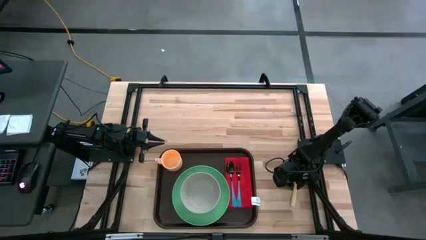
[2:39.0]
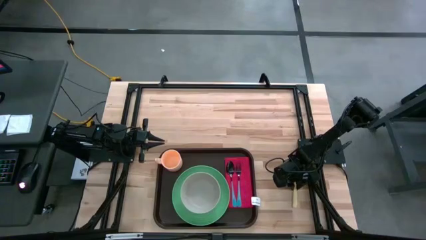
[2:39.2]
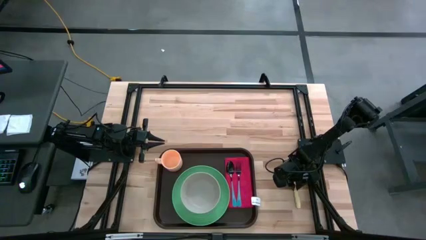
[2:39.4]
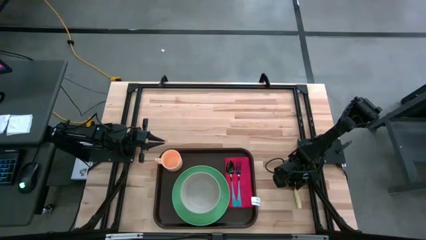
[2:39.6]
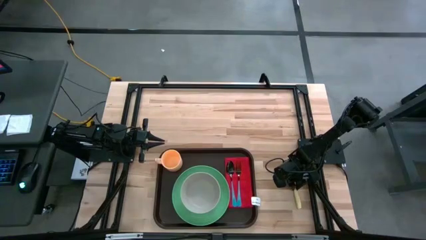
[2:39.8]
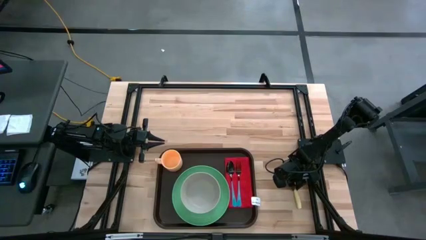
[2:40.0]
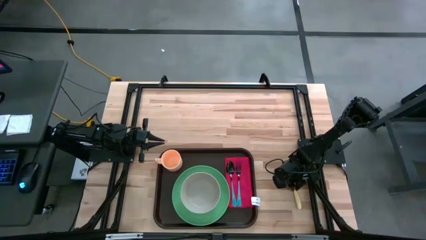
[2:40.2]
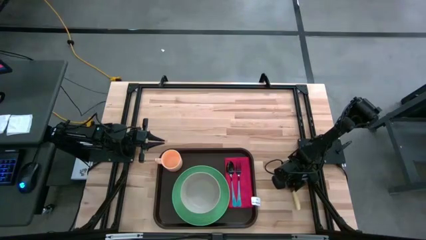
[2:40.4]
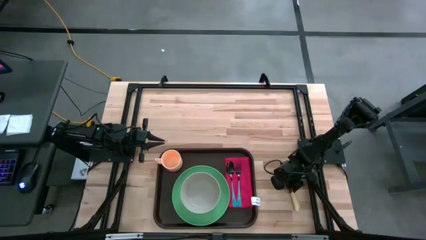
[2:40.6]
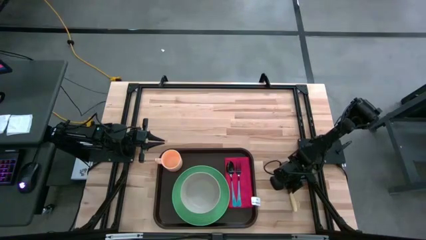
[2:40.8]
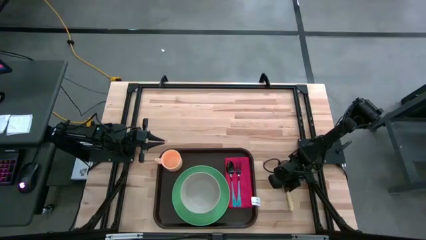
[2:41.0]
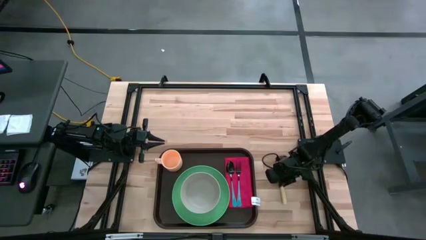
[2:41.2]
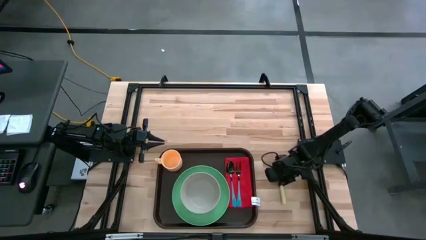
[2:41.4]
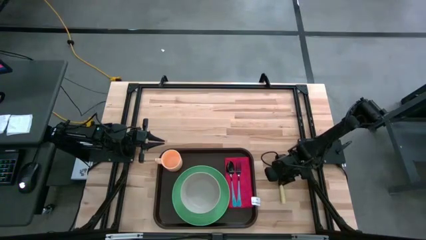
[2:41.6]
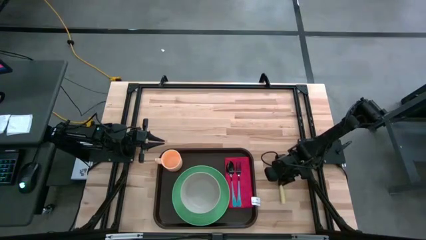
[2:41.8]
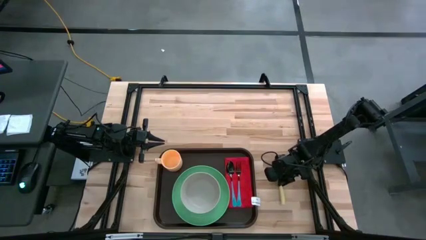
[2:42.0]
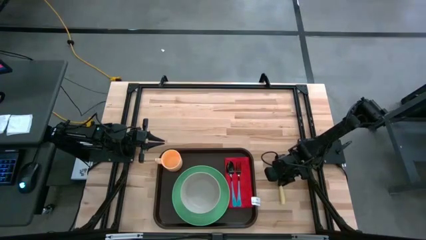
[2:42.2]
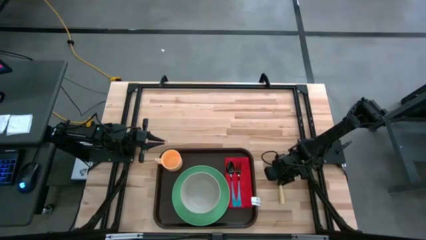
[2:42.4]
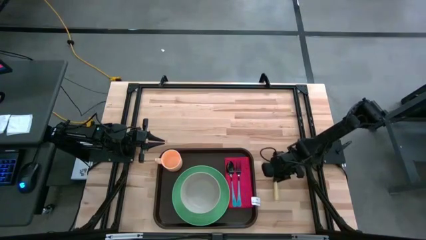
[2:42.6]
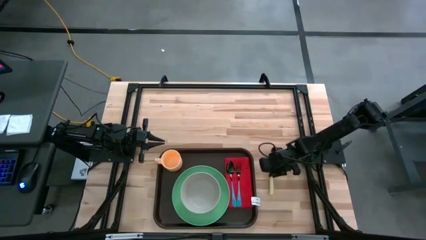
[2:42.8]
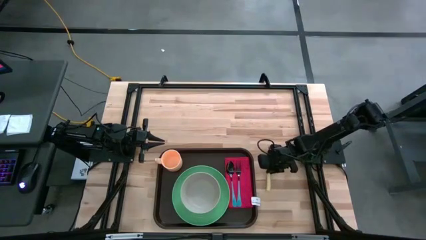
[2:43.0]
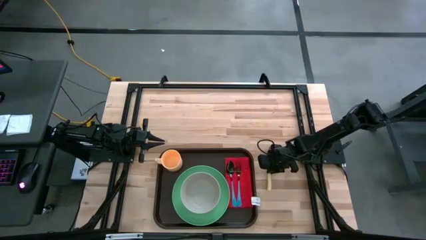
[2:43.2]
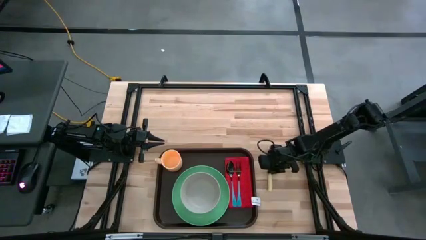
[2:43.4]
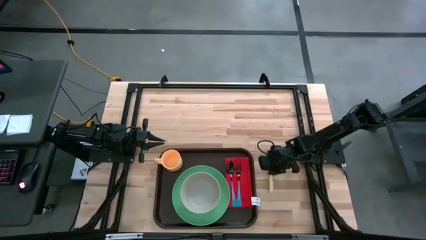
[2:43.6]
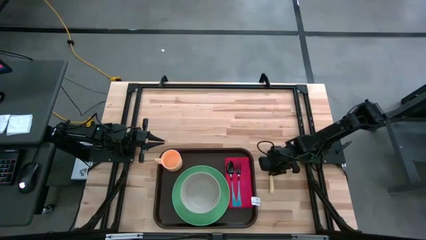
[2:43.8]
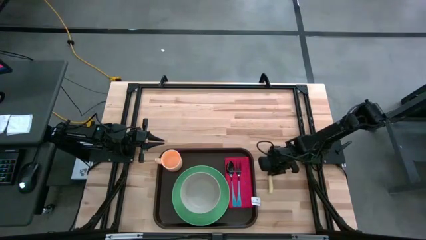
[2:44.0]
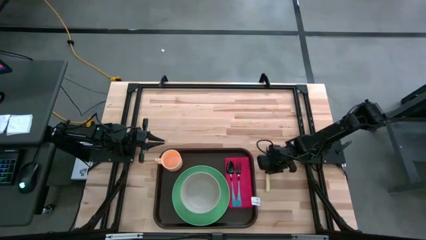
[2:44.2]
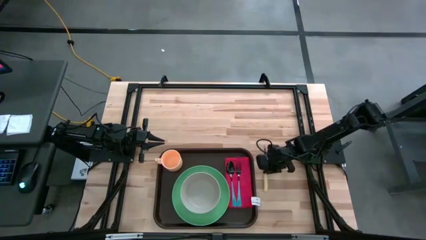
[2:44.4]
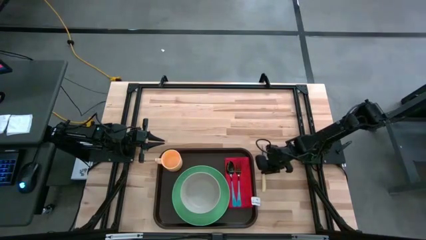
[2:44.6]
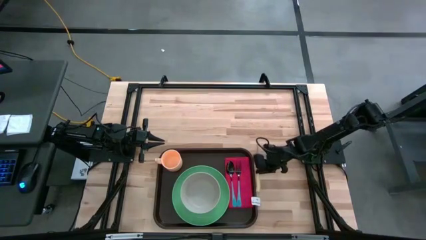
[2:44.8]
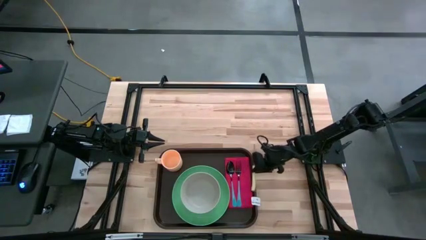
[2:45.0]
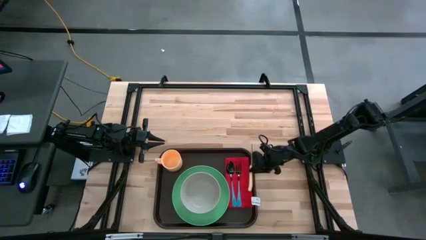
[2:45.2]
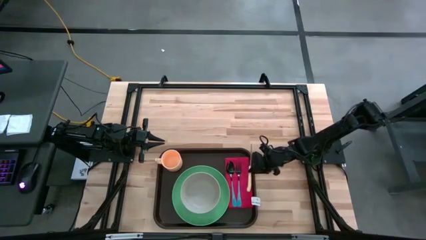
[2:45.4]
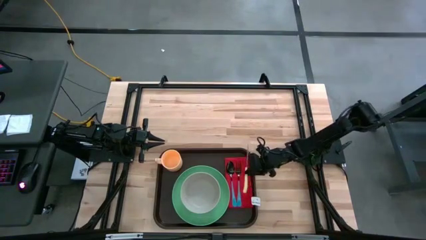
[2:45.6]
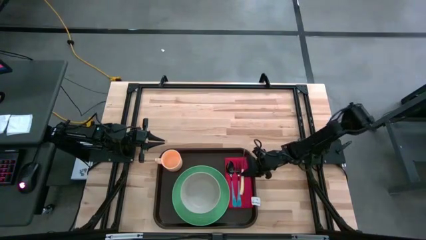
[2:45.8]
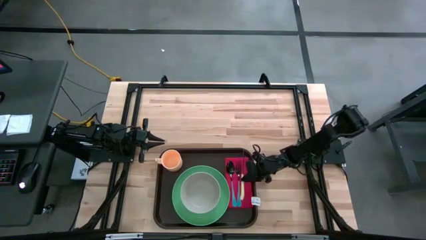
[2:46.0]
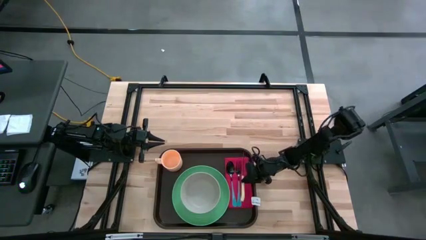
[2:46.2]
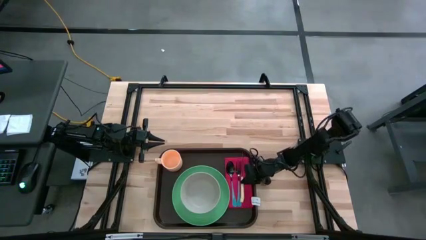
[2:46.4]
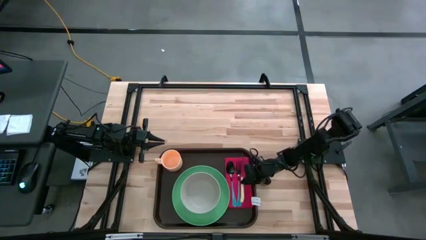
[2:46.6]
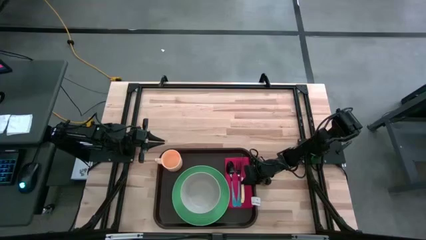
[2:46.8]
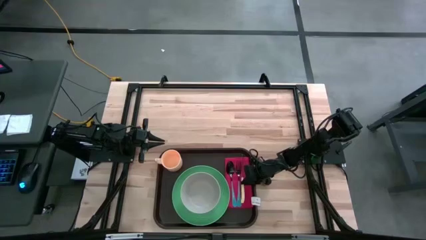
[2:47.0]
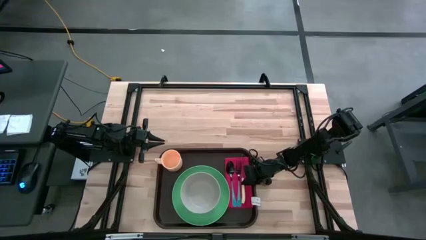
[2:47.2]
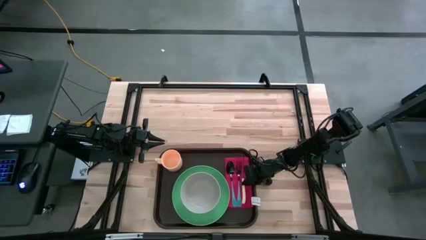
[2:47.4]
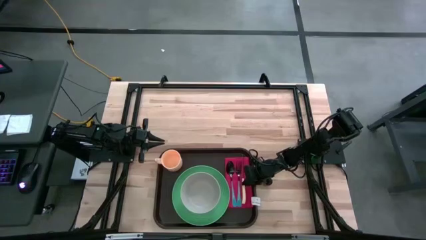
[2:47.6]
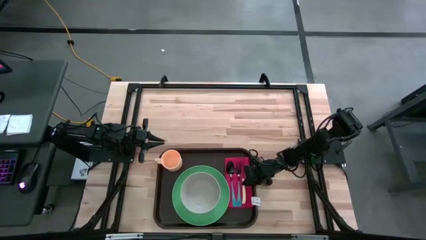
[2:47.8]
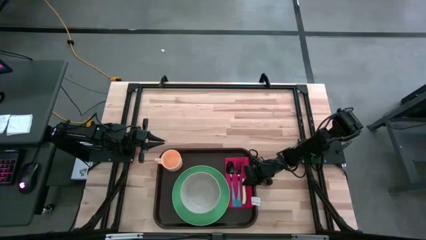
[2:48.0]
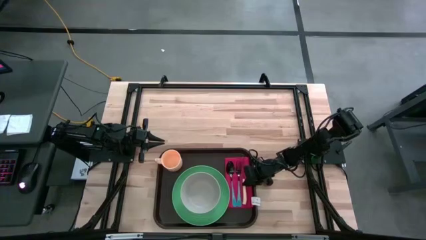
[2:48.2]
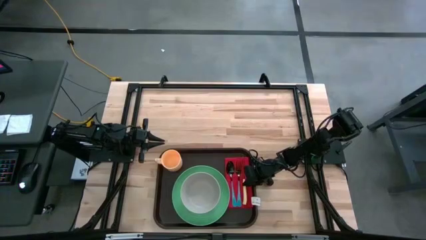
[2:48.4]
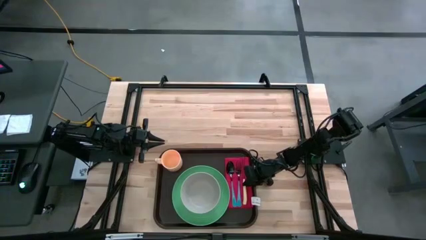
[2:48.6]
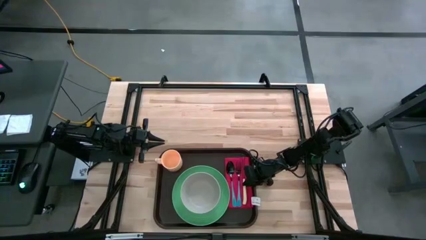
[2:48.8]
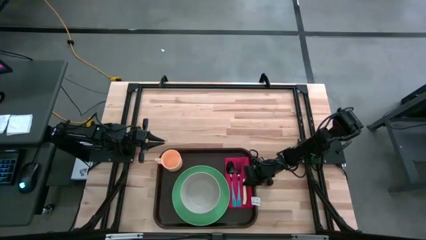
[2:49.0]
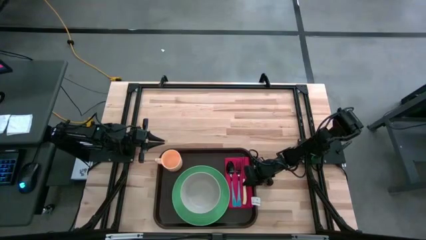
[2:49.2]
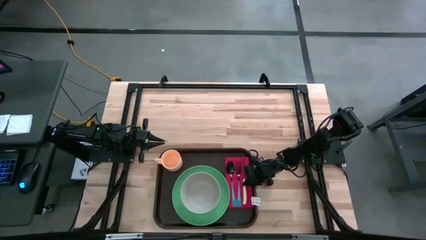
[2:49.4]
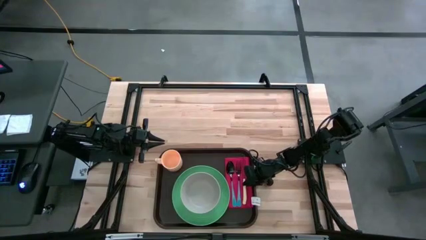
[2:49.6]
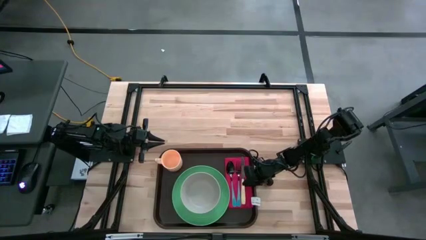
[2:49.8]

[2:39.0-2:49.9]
Task: Set up tray
Put the yellow table knife on top of the red table napkin to the right of the blue fork

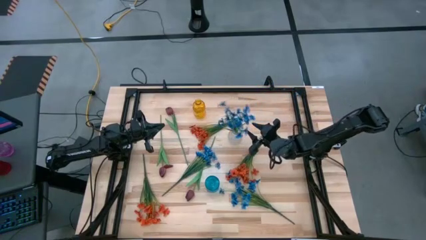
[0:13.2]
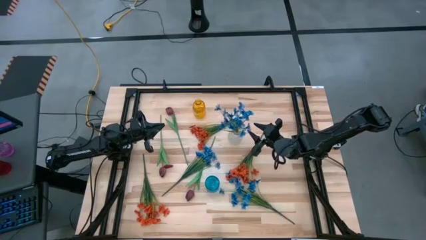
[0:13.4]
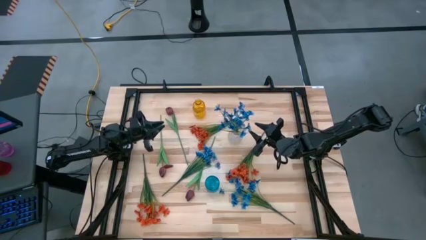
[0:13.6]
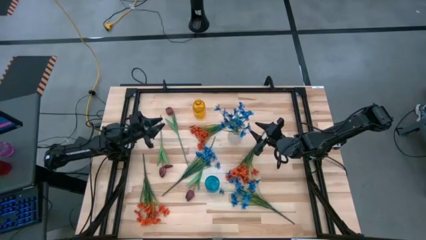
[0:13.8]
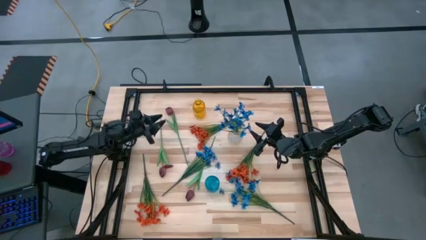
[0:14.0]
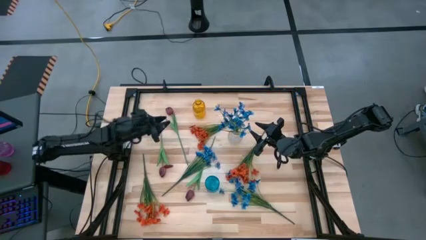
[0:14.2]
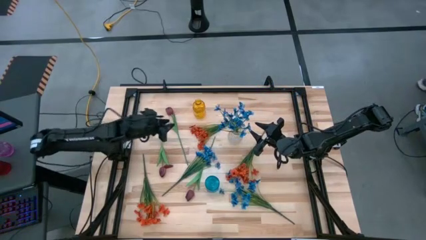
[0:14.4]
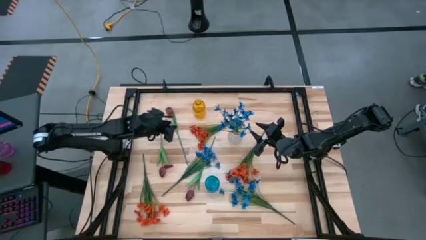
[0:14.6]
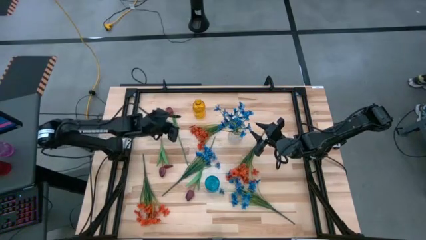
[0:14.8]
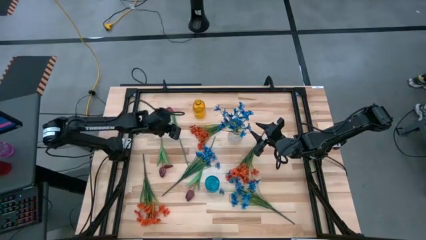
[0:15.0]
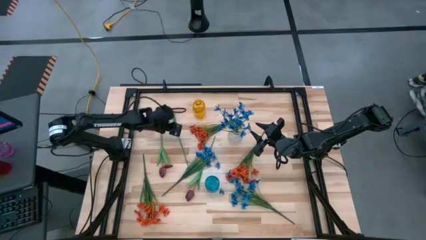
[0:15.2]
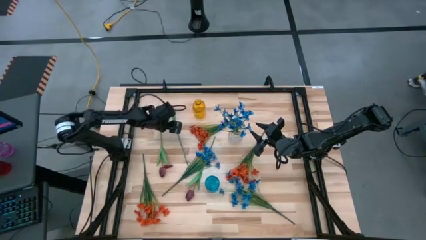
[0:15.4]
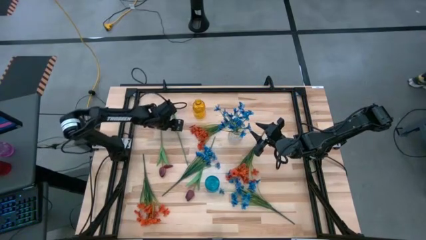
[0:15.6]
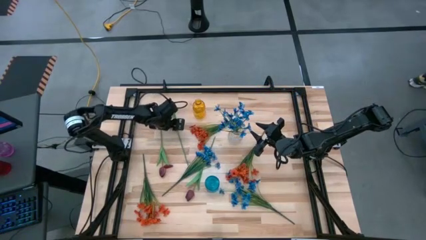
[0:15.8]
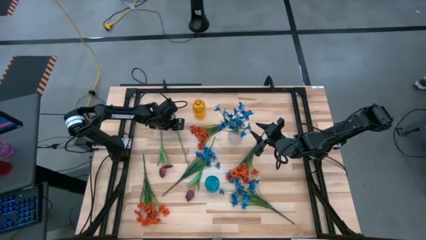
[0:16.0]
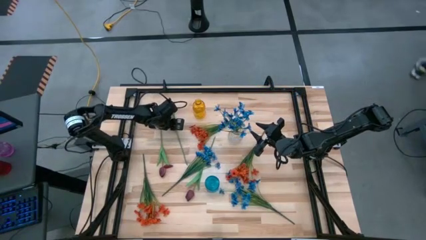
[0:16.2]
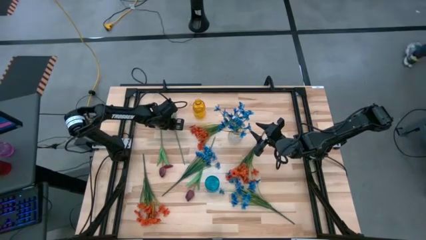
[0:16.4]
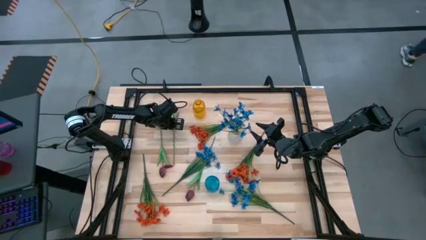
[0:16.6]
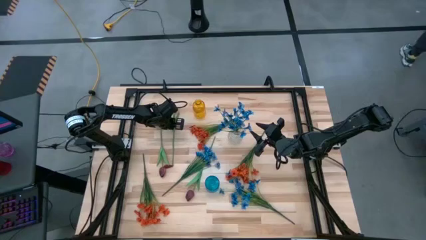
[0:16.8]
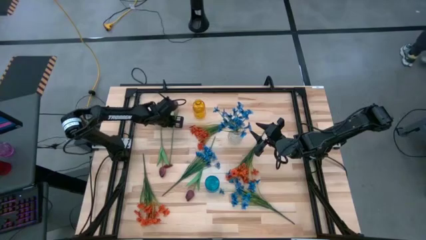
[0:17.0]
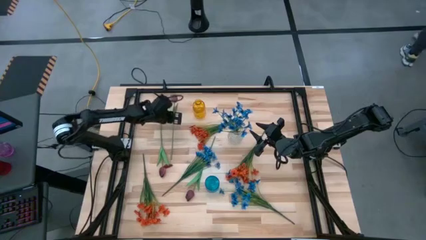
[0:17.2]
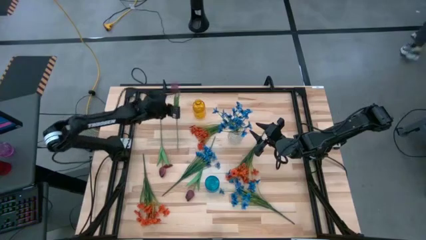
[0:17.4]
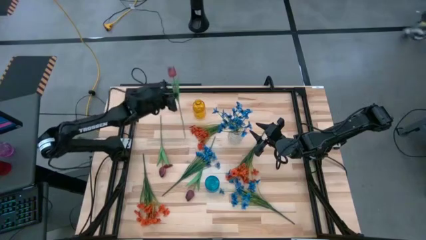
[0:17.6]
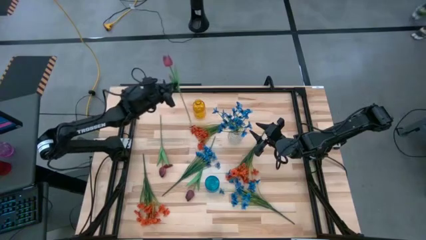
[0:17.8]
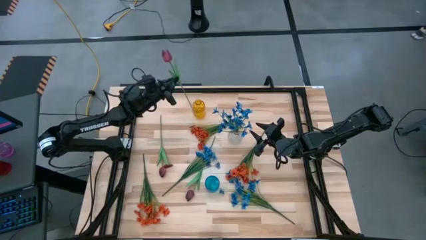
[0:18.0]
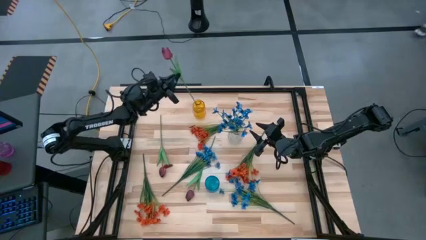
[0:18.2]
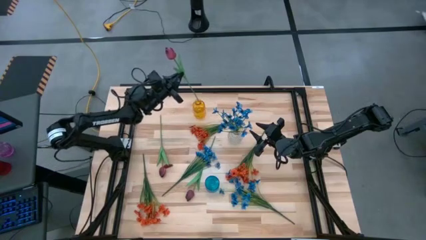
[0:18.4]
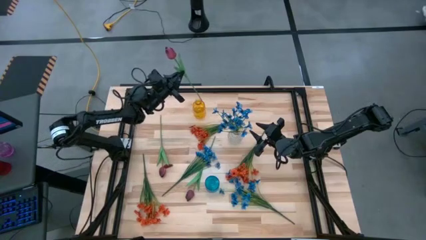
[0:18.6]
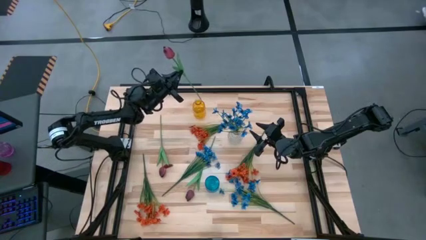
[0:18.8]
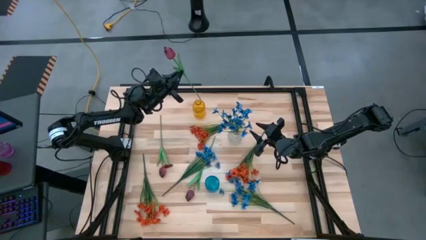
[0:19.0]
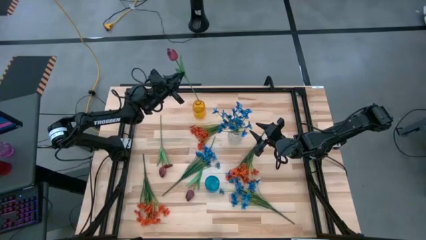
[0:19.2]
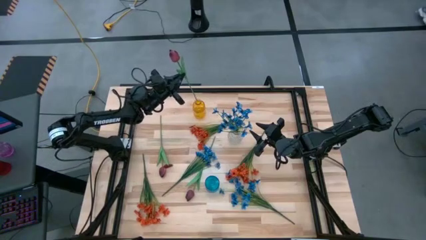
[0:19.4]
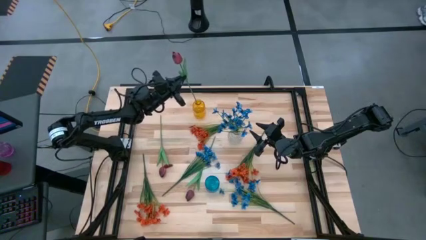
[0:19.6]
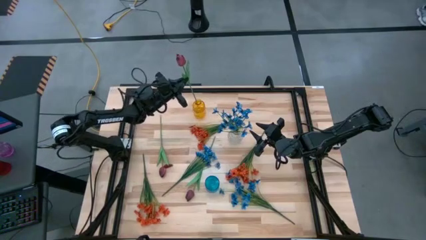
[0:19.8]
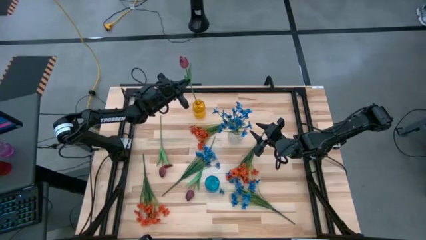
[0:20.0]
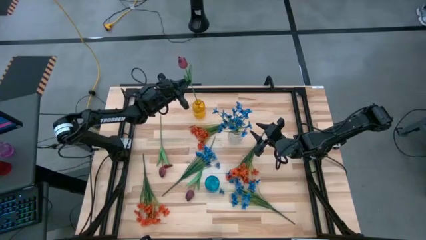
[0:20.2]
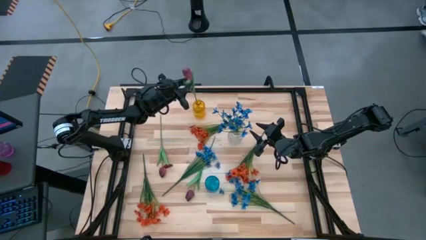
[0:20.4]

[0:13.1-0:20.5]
Task: Sort flowers into vase by color
Put the middle red flower into the yellow vase
